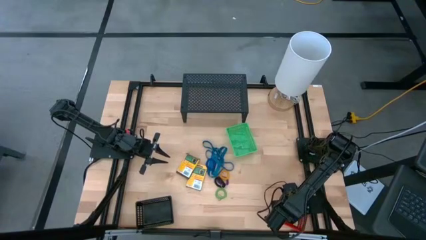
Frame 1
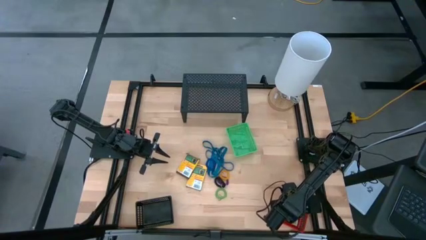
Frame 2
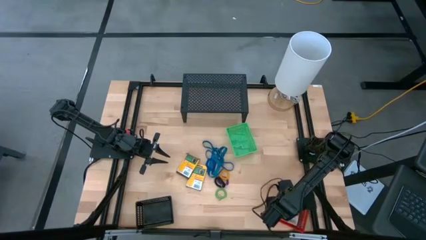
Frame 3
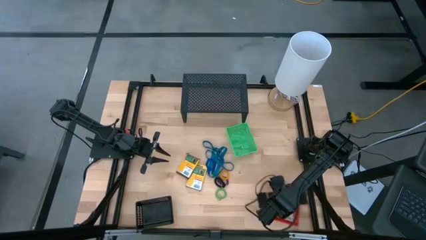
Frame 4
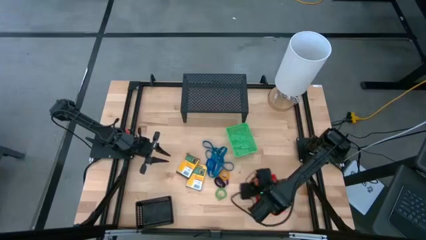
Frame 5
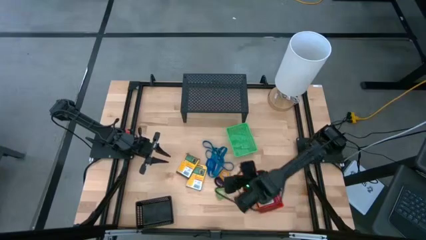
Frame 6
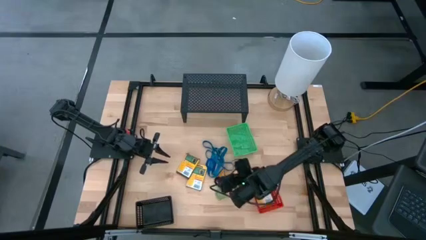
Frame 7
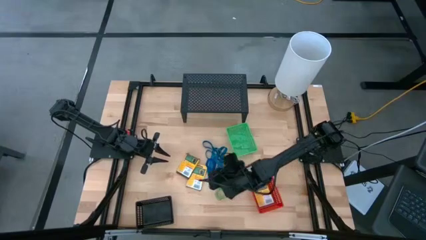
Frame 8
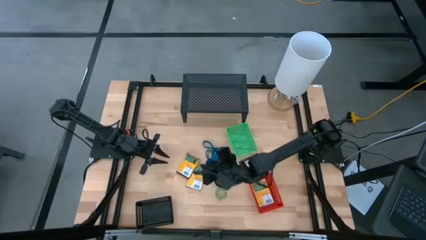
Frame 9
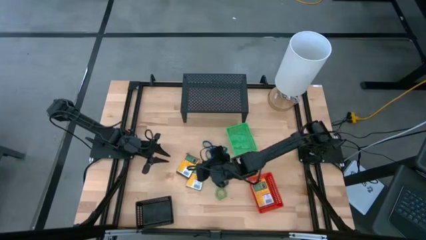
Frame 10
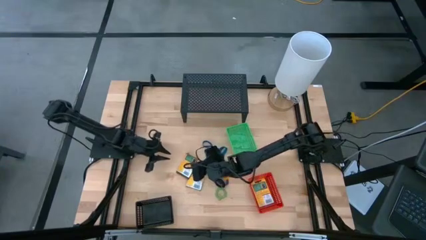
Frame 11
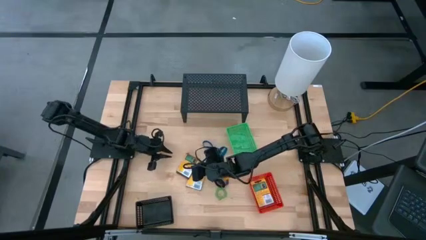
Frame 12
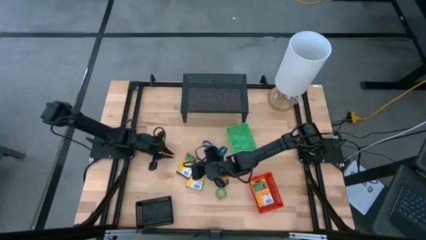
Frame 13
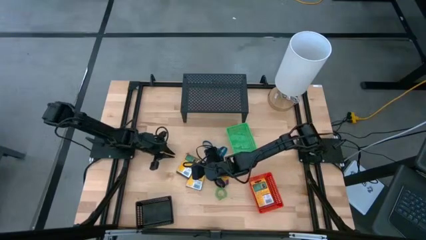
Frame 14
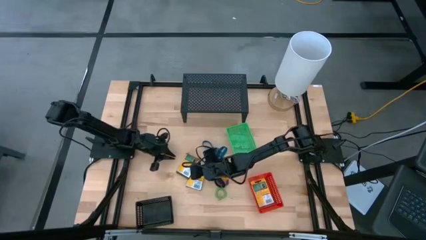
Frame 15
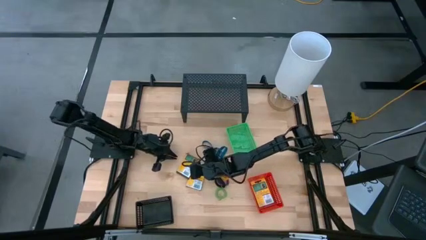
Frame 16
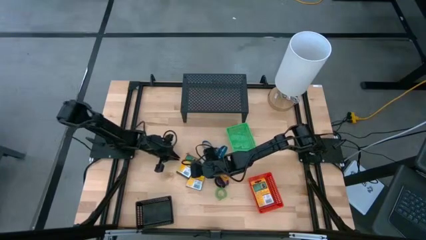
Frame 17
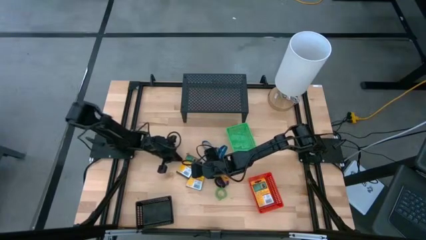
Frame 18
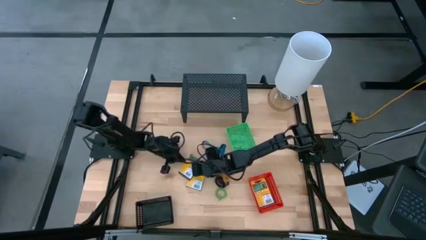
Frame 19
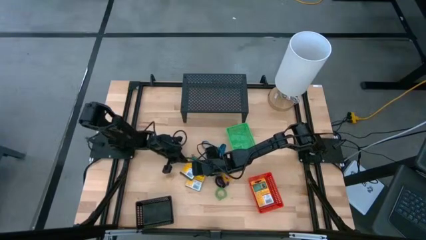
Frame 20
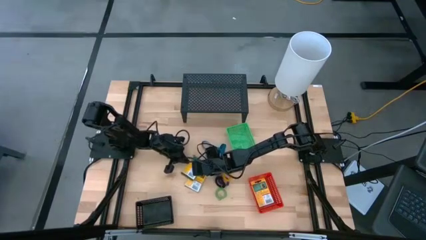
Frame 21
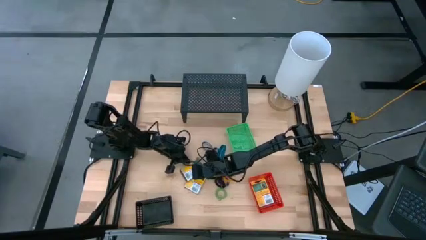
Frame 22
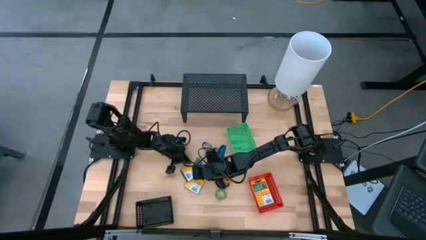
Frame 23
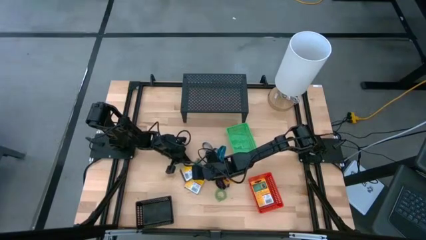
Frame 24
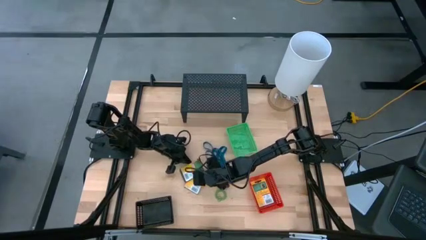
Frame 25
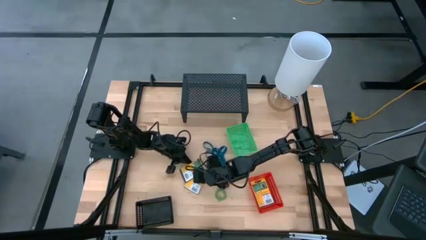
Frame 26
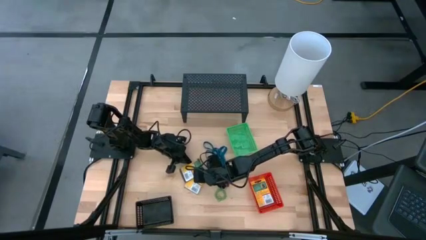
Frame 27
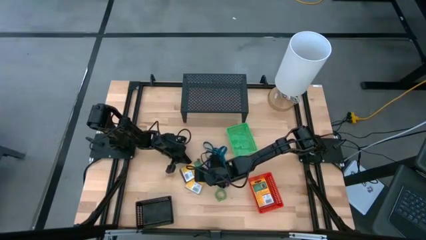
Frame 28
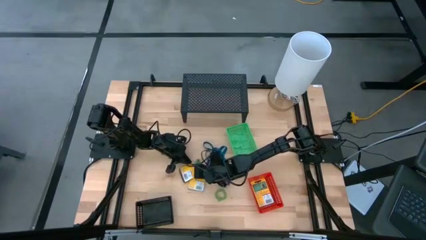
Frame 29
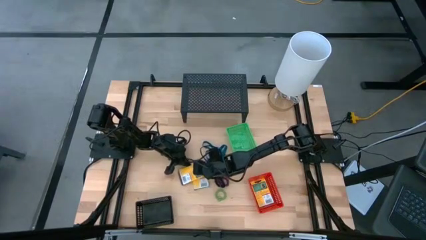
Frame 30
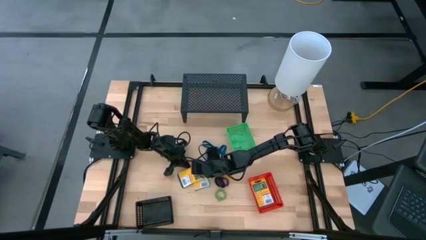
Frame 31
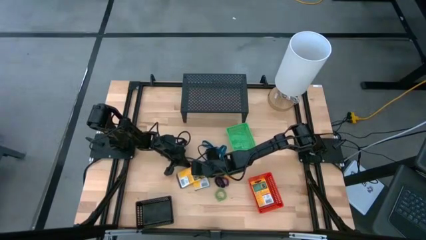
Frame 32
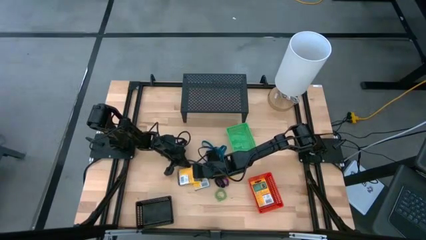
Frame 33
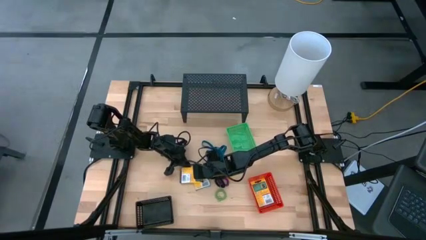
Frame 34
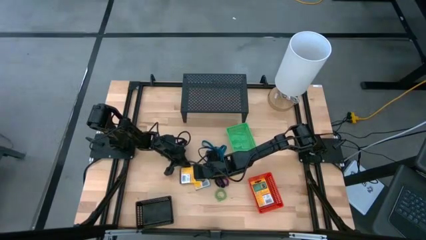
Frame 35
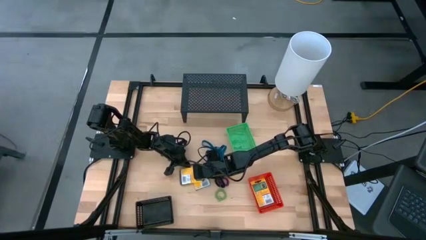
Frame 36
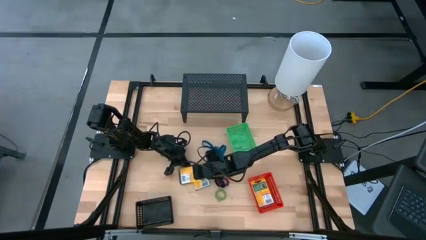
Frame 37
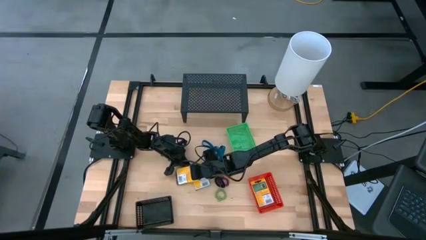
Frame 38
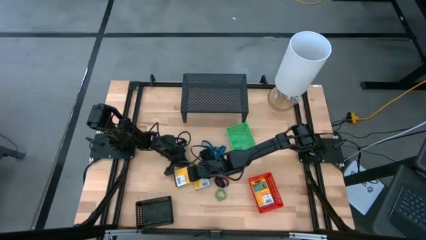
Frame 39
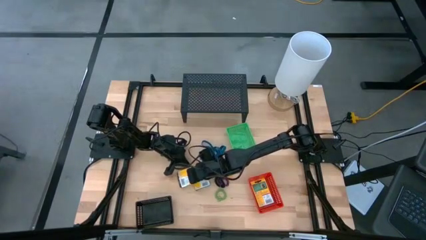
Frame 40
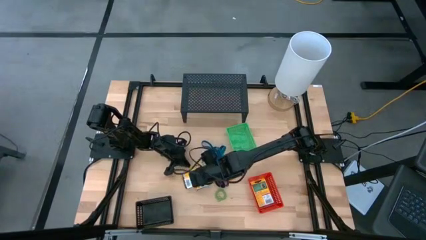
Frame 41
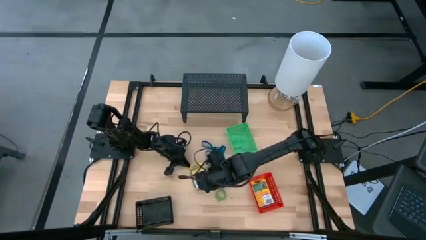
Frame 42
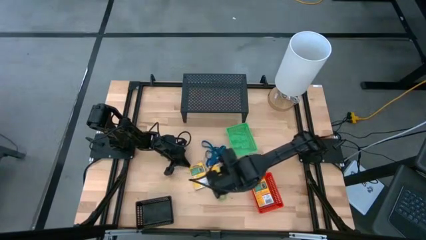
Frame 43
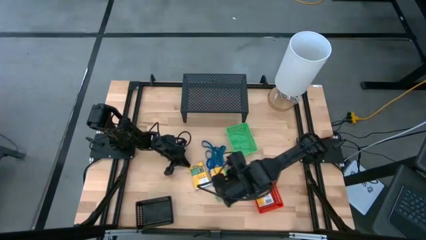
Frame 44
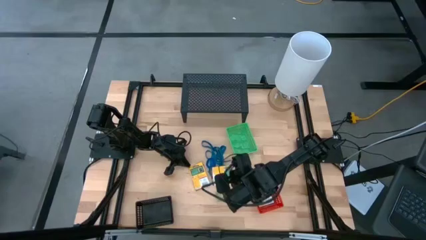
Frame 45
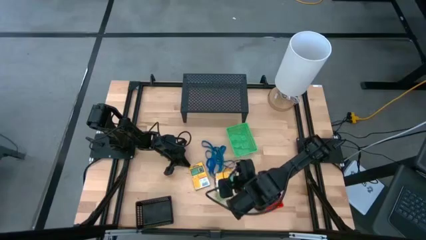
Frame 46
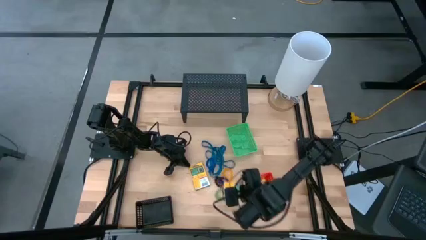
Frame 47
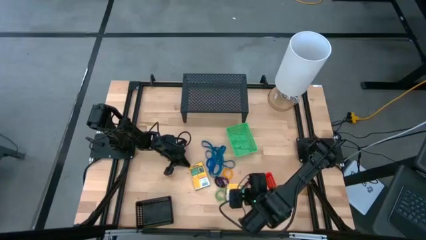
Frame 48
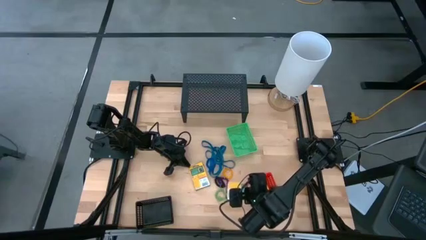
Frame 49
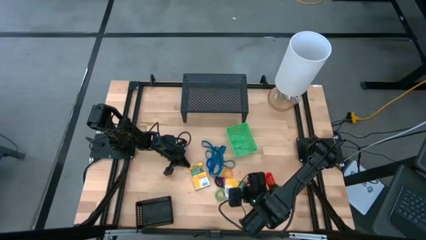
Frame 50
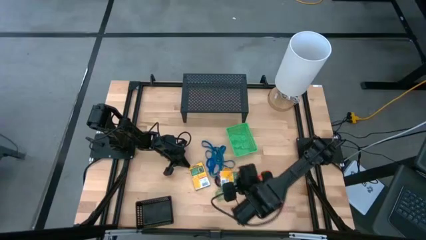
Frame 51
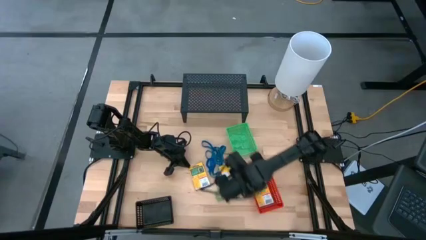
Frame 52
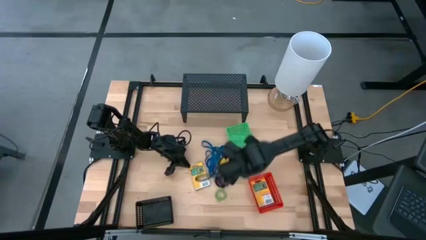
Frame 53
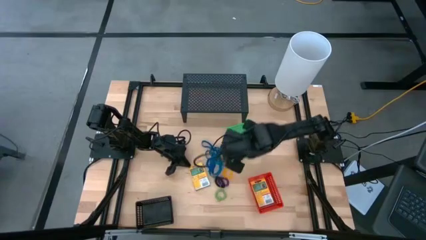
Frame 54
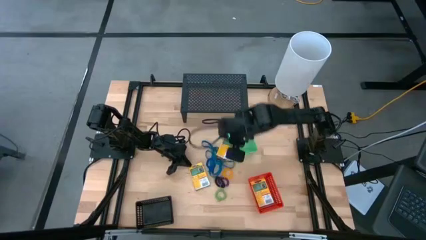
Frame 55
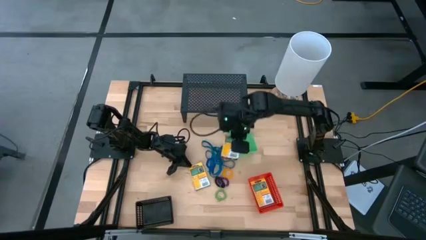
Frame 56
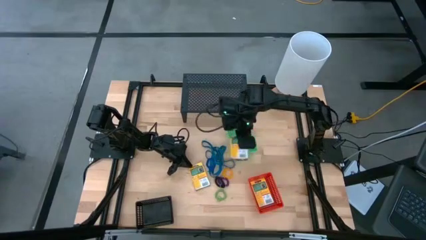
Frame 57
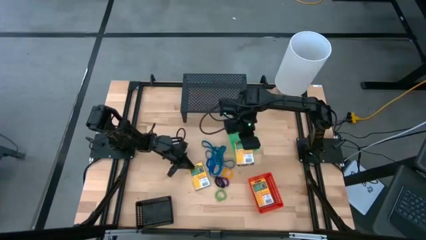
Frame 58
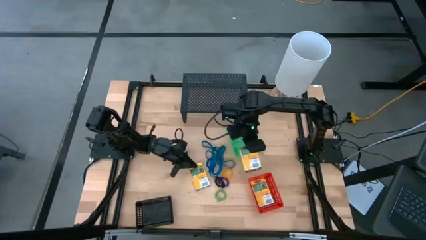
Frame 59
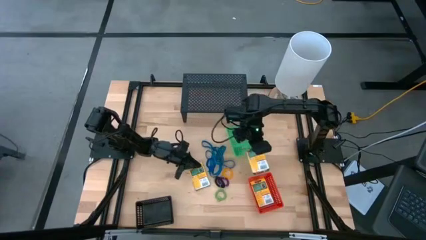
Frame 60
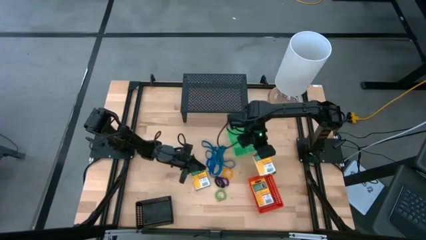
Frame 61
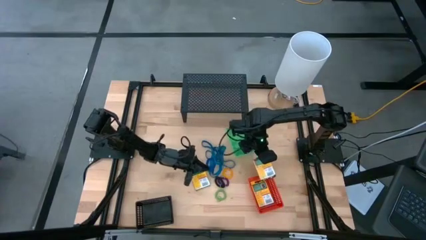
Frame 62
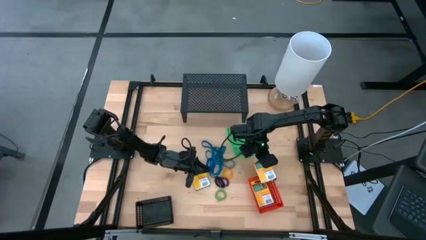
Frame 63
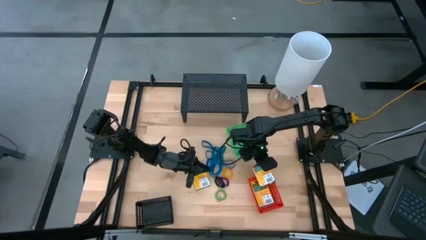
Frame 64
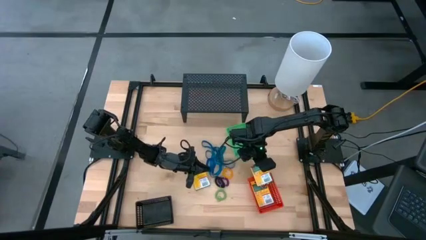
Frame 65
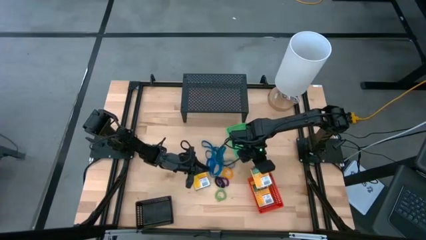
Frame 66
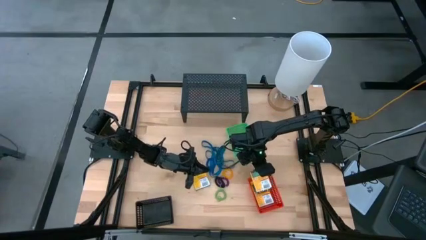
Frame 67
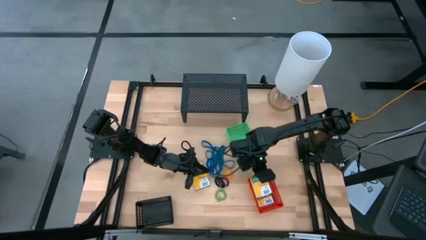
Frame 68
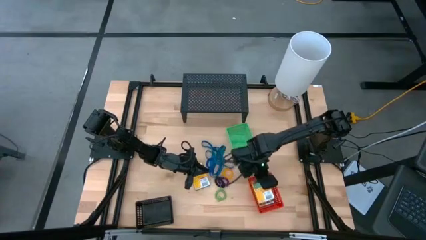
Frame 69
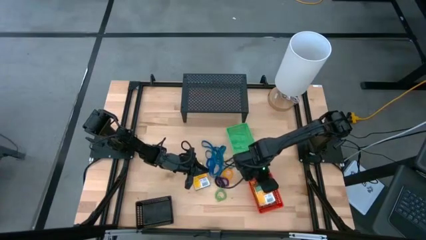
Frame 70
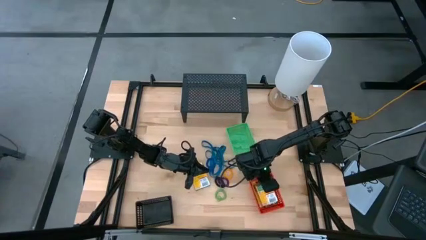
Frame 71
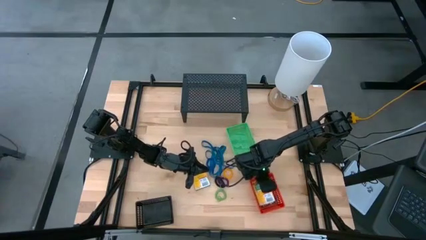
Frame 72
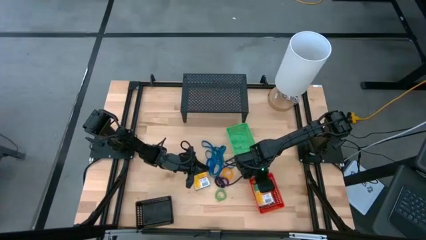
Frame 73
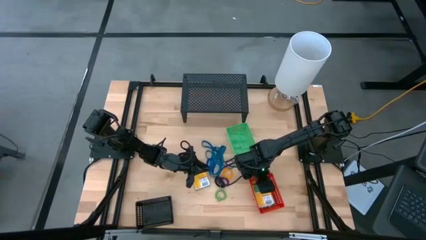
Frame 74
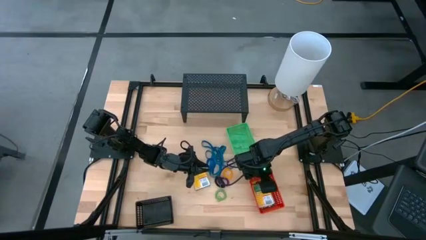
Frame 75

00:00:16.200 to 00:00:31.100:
Task: Pick & Place Office Desk Supplies
Put the crayon box into the red basket
